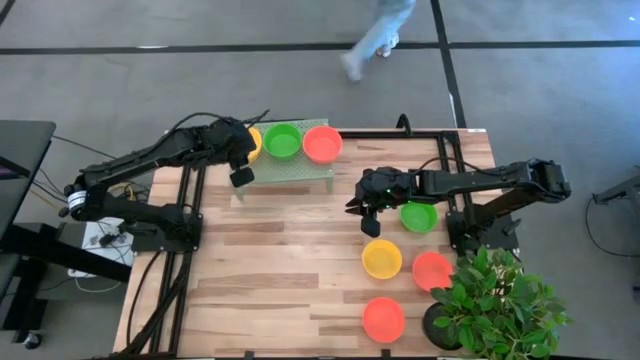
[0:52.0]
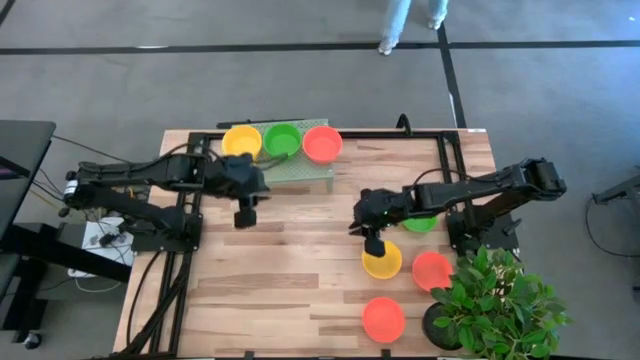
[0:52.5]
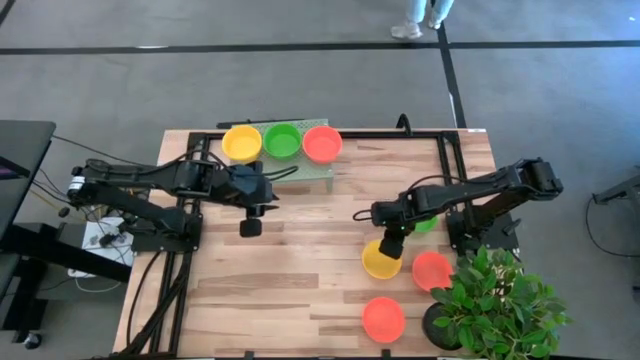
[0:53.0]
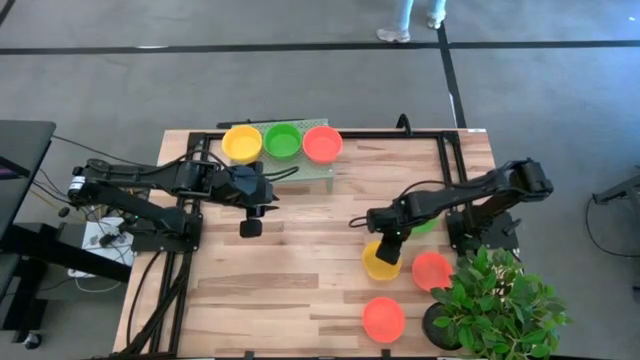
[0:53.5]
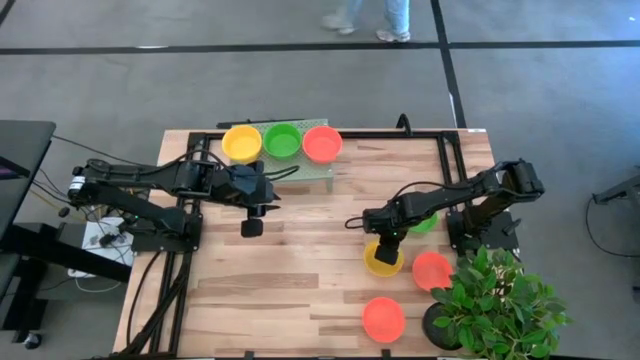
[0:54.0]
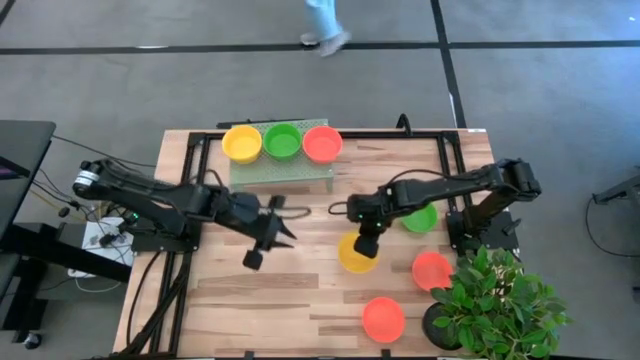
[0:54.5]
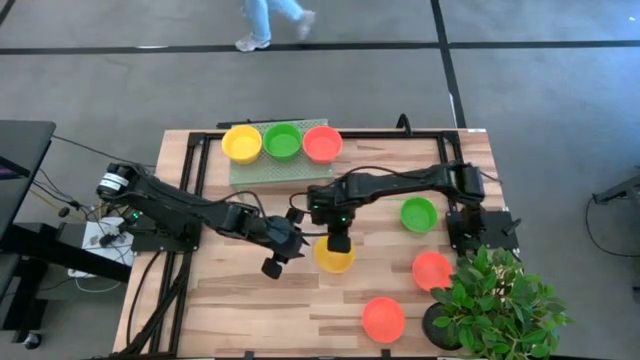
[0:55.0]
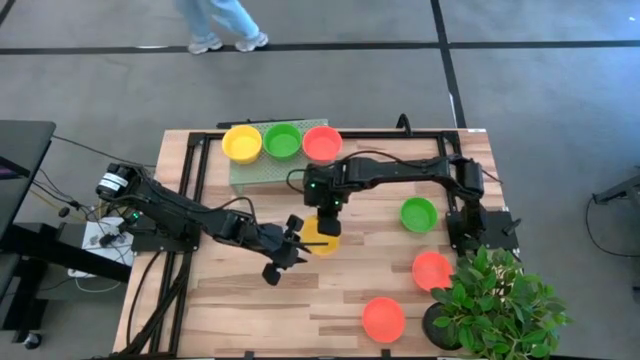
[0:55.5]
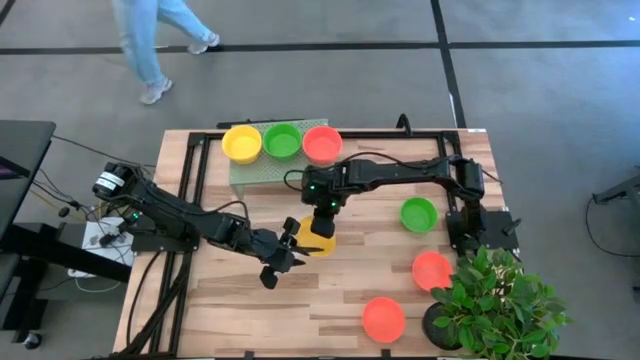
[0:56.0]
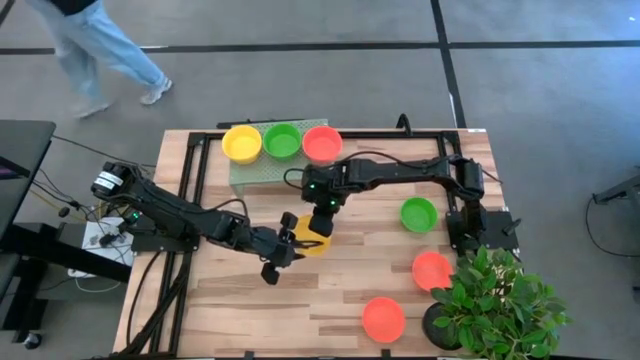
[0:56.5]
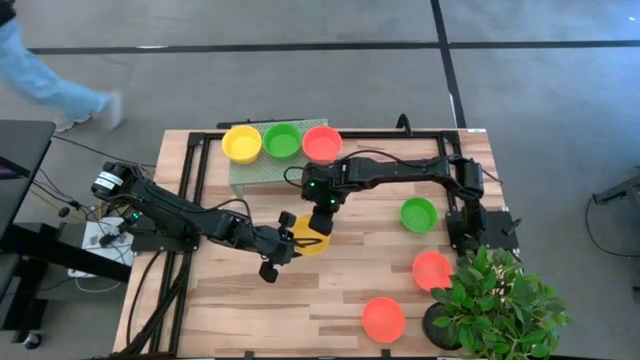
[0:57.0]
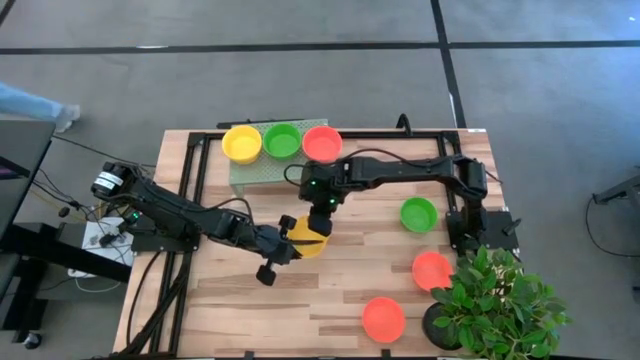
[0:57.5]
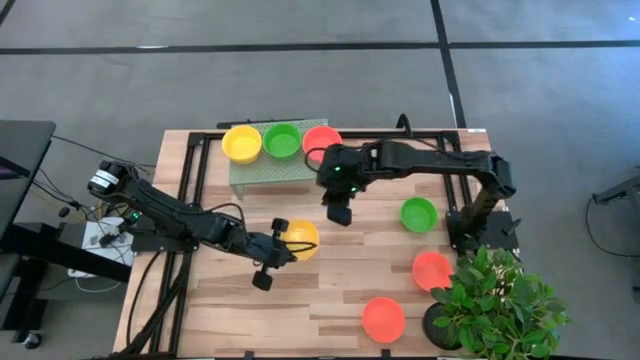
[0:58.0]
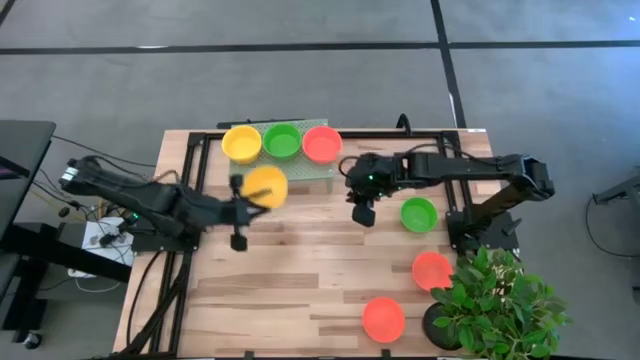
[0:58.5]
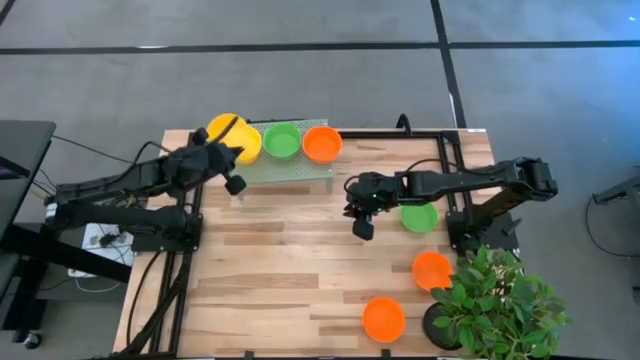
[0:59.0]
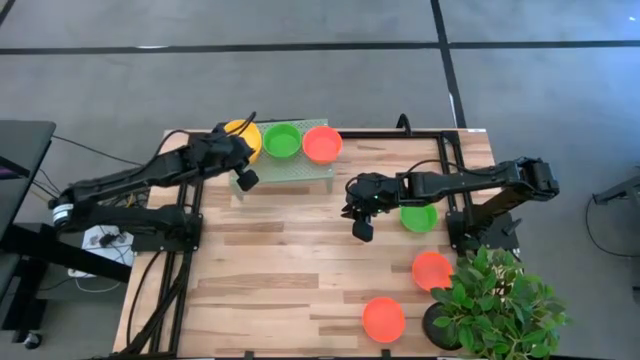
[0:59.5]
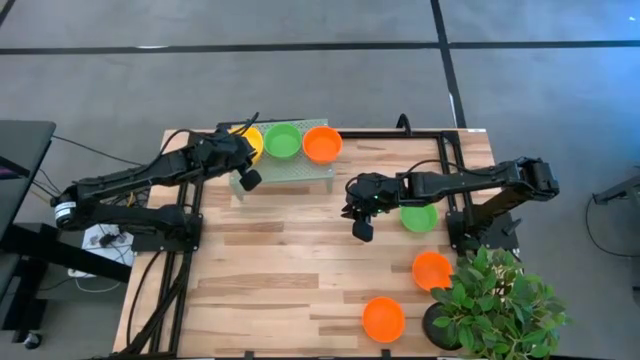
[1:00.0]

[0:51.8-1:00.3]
Task: Pick & Place Mini bowls
Stack the yellow bowl on top of the other yellow bowls on the shelf

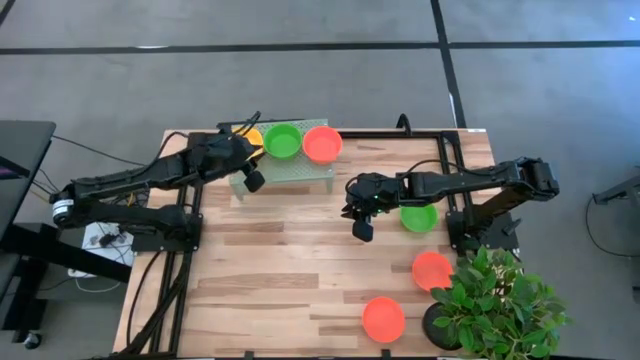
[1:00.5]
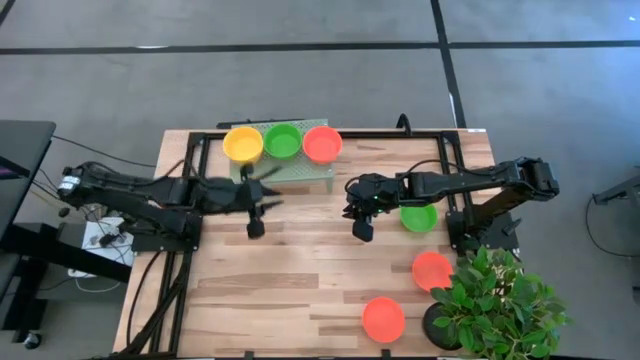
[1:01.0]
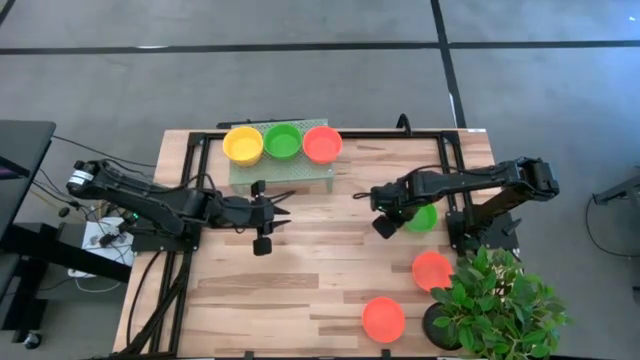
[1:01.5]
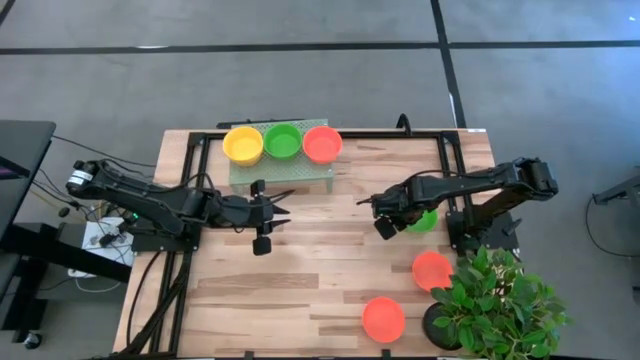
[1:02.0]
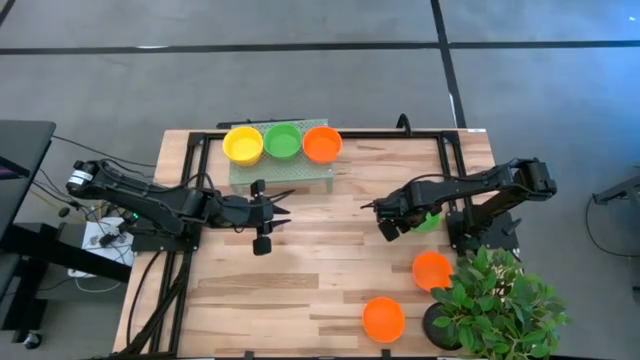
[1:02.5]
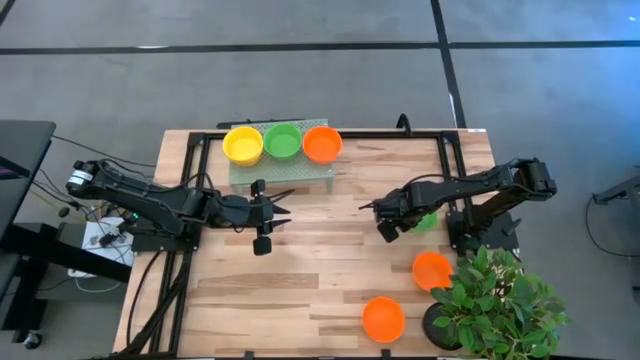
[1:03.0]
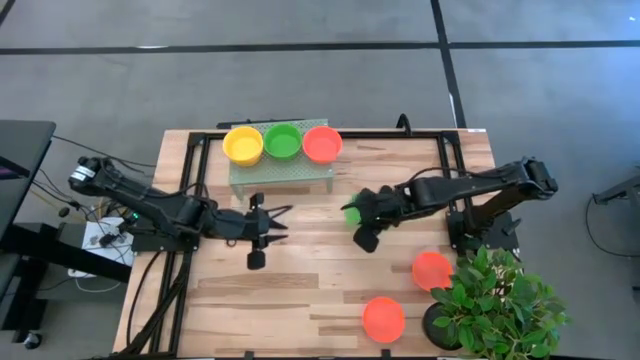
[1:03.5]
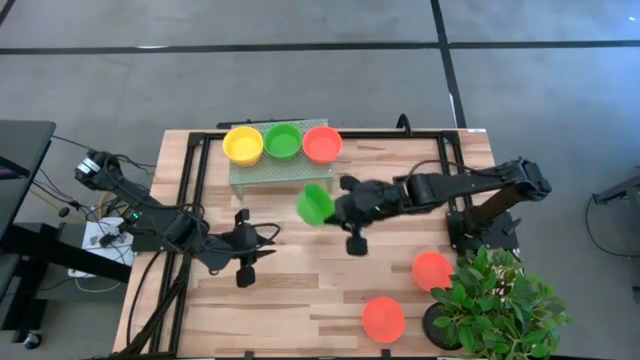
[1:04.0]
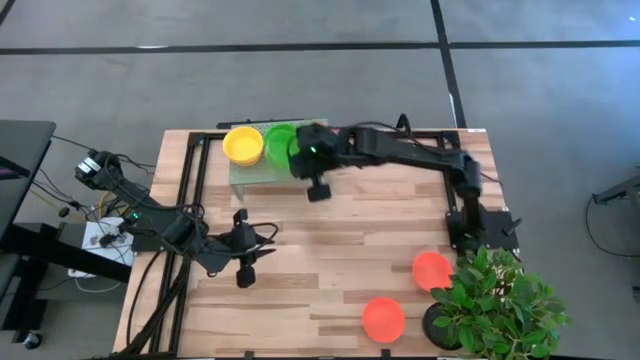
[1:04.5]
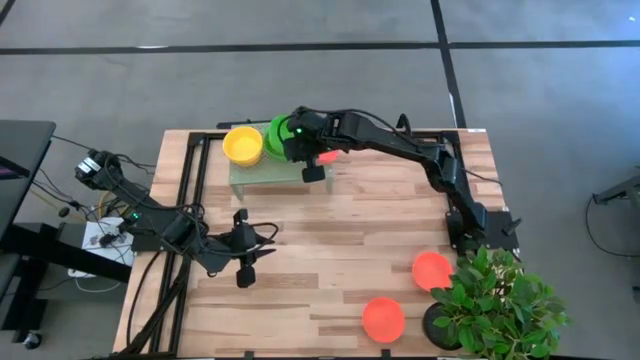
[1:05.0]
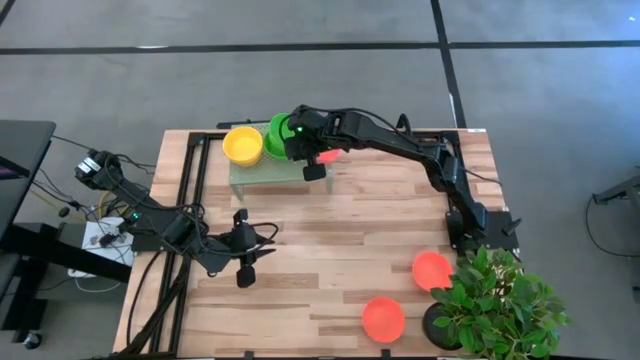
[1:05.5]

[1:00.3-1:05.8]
Stack the green bowl on top of the other green bowls on the shelf

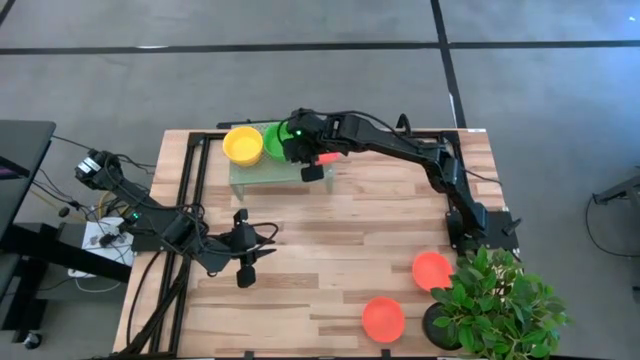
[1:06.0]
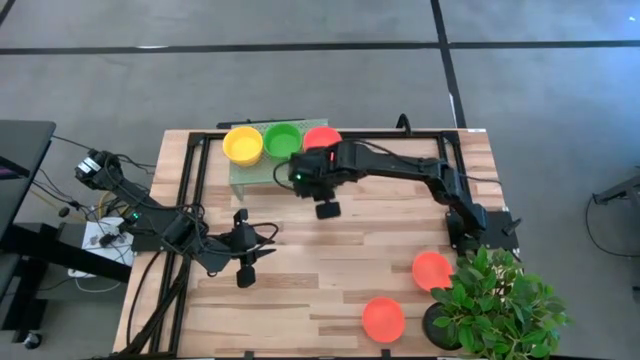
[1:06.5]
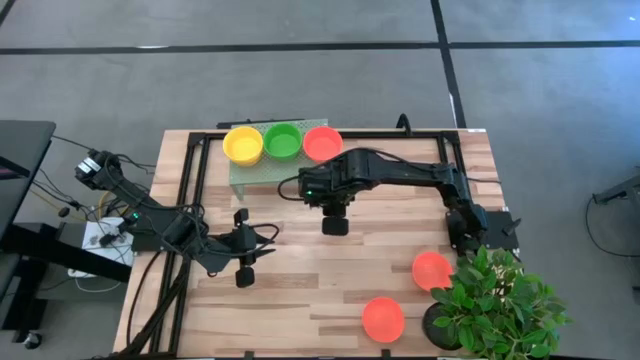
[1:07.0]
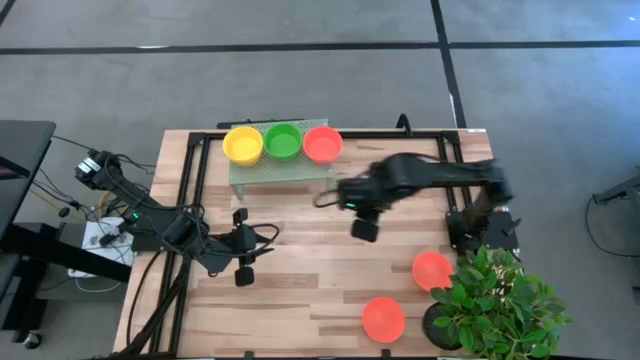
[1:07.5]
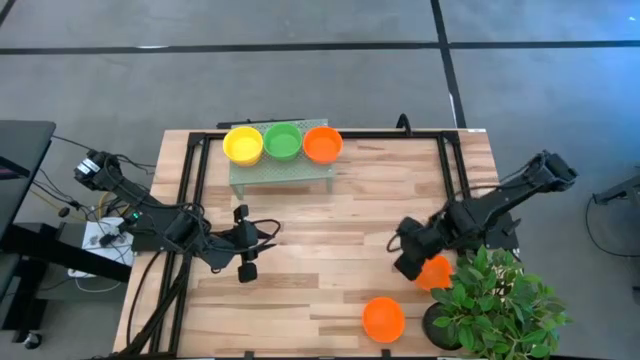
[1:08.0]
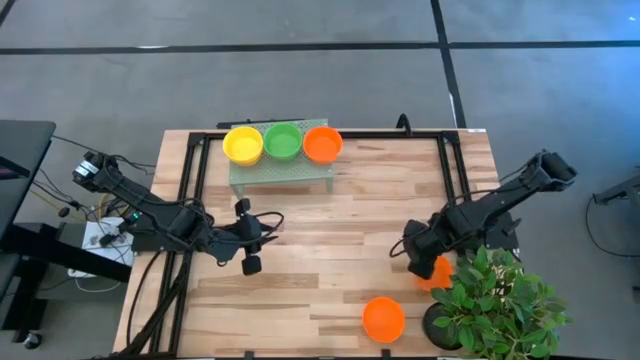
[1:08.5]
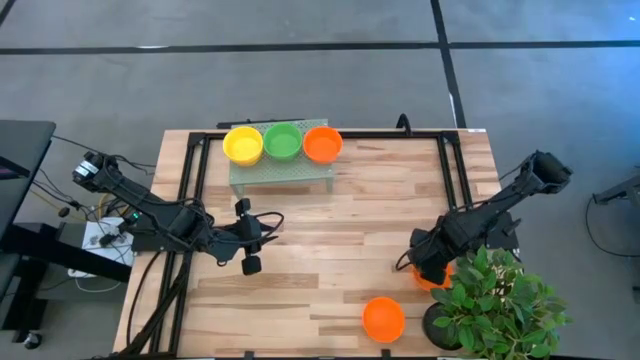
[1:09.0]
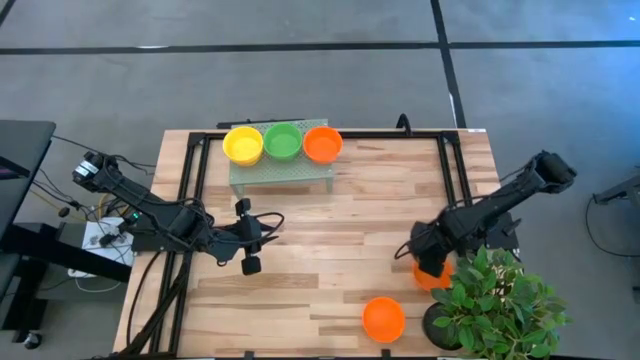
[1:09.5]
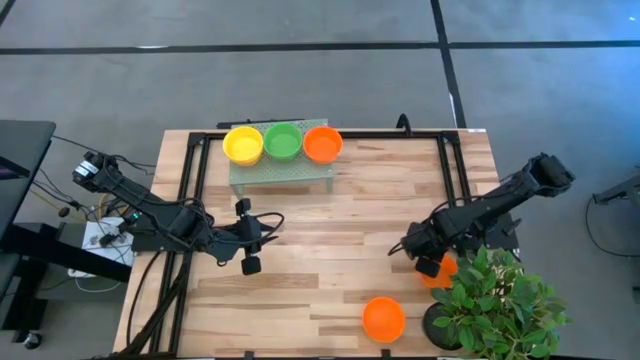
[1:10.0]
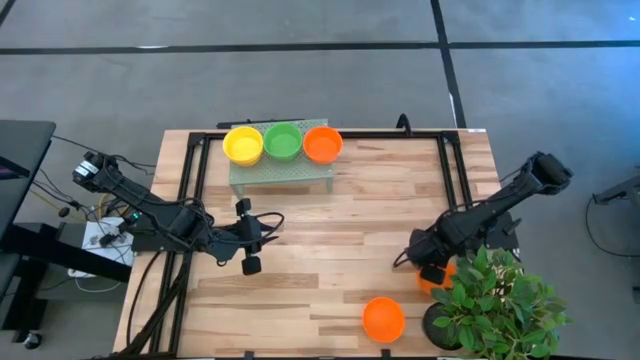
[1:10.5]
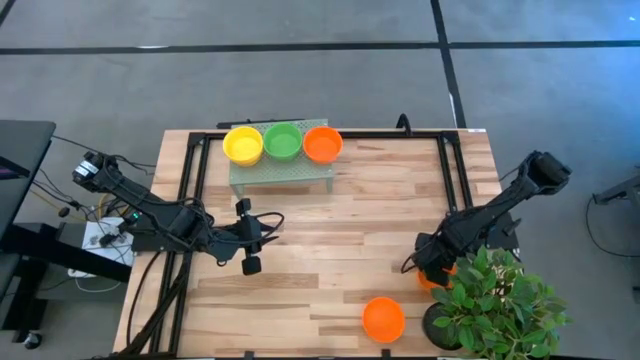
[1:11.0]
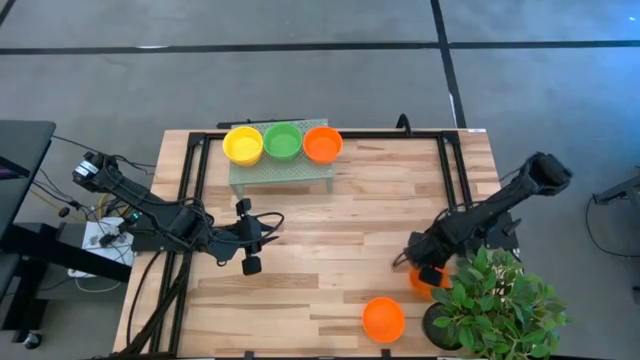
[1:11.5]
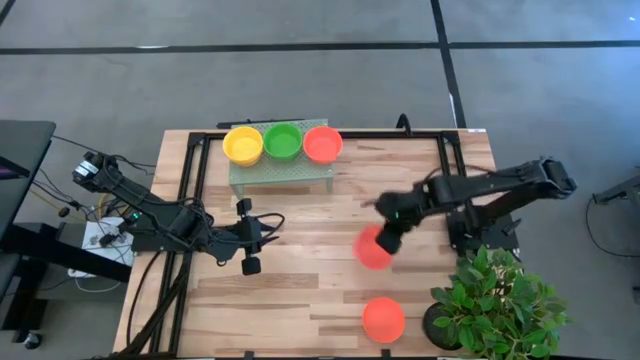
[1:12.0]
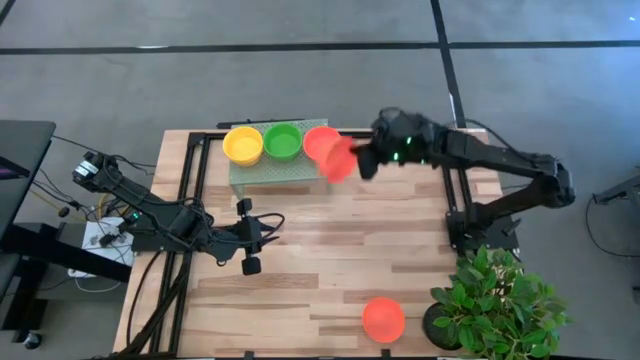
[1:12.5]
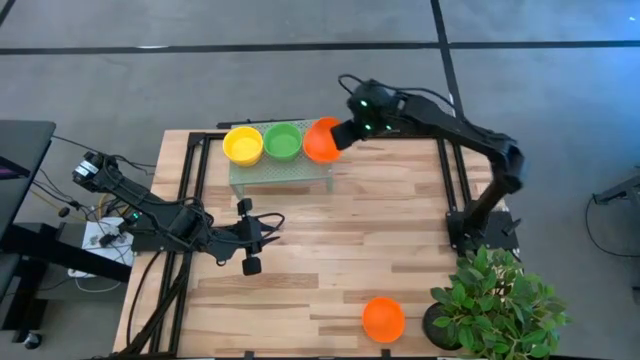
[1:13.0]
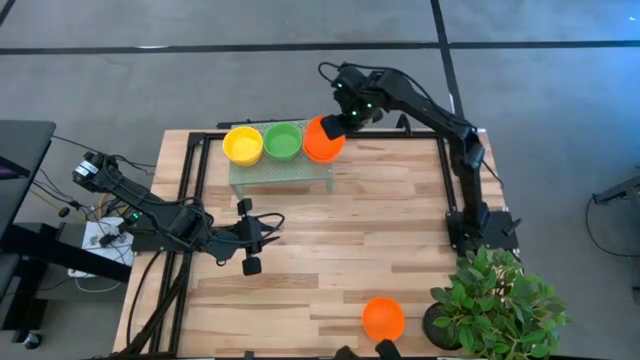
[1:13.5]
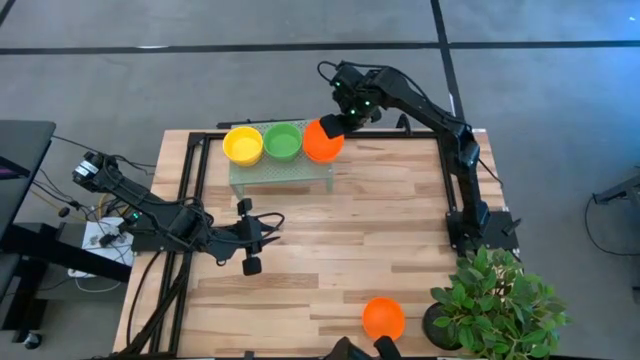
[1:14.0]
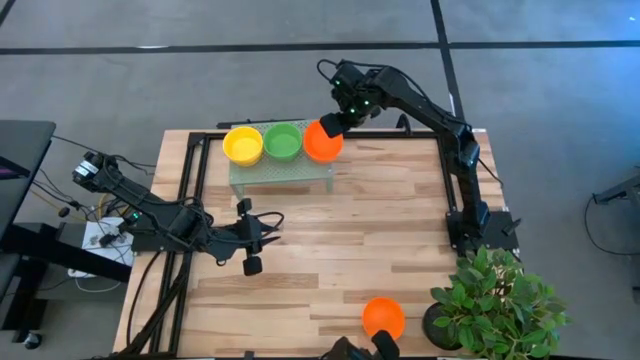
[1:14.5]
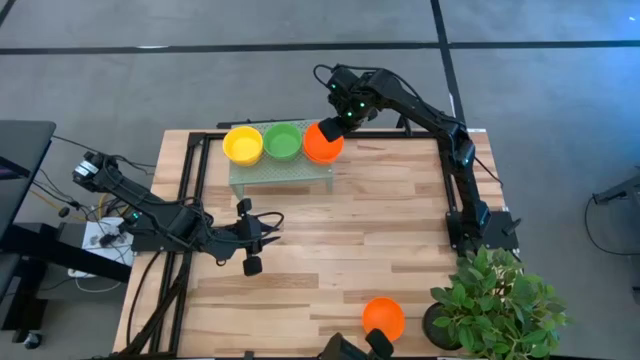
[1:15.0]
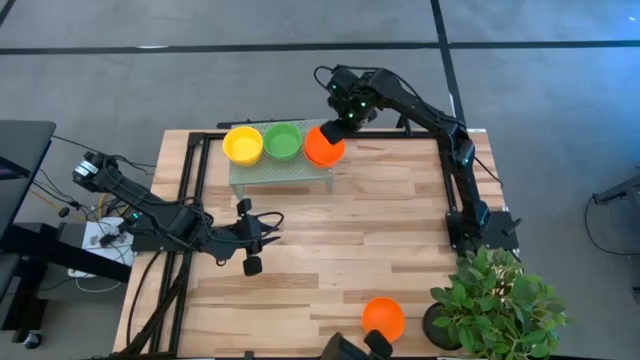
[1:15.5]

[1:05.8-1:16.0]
Stack the orange bowl on top of the other orange bowls on the shelf
